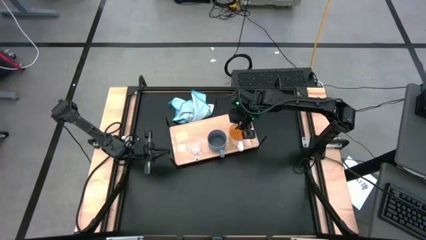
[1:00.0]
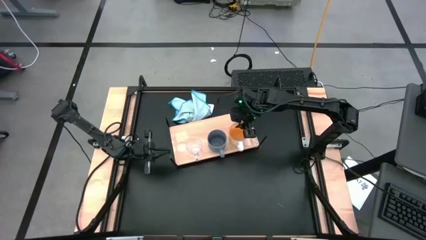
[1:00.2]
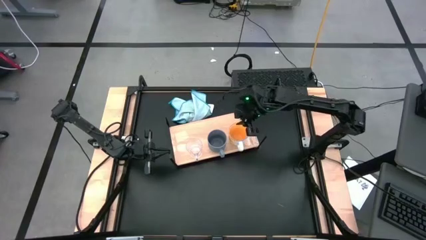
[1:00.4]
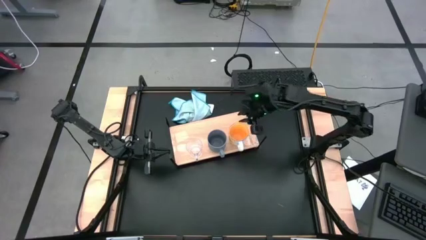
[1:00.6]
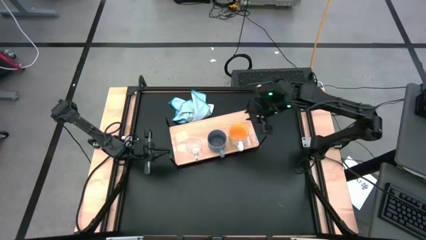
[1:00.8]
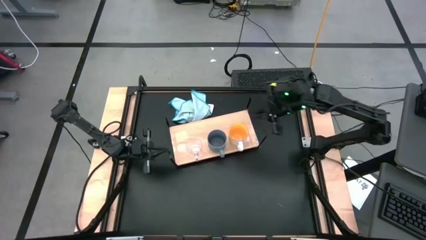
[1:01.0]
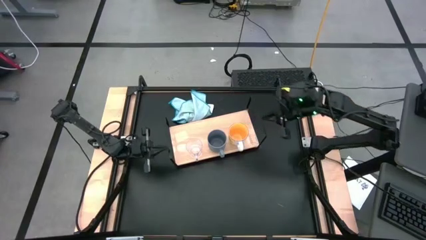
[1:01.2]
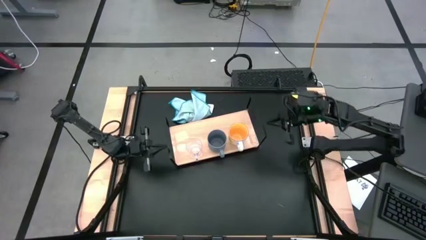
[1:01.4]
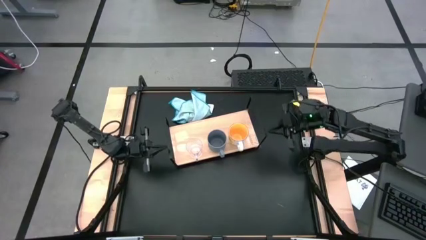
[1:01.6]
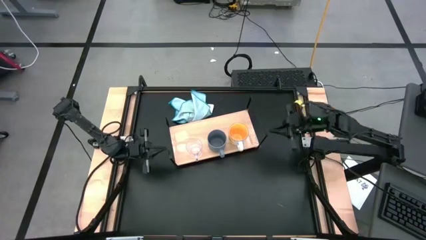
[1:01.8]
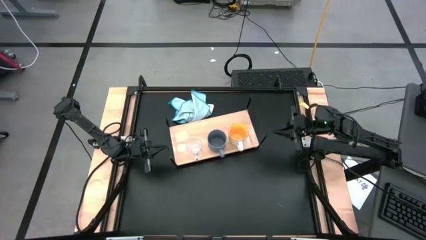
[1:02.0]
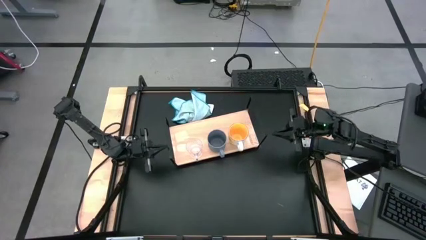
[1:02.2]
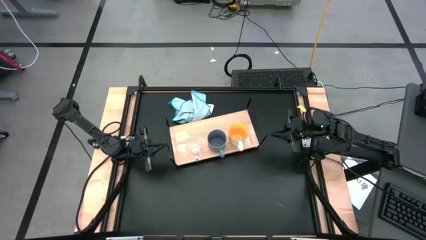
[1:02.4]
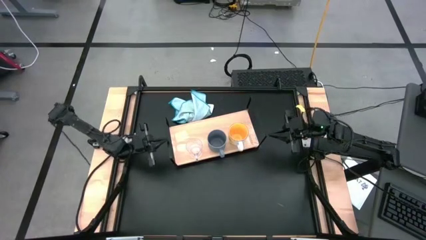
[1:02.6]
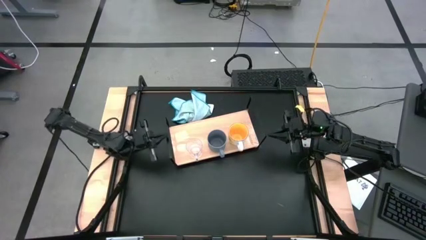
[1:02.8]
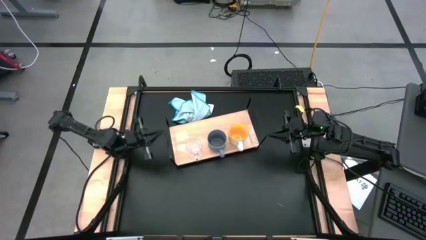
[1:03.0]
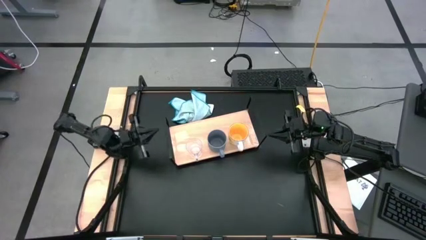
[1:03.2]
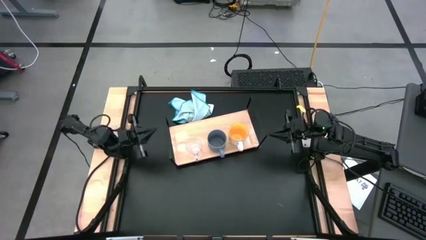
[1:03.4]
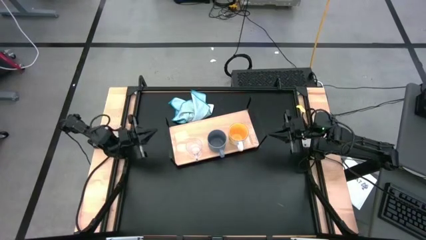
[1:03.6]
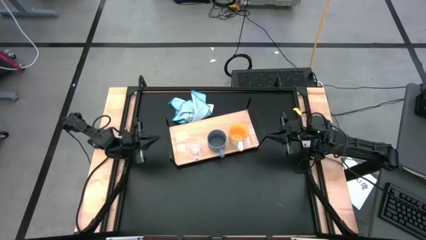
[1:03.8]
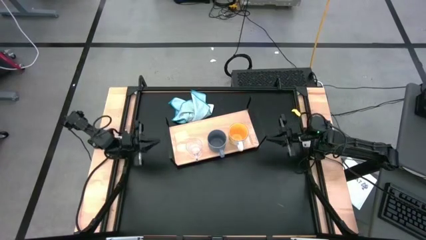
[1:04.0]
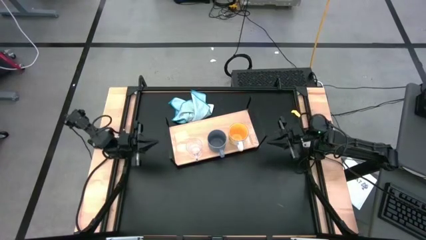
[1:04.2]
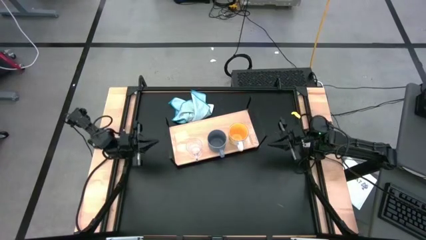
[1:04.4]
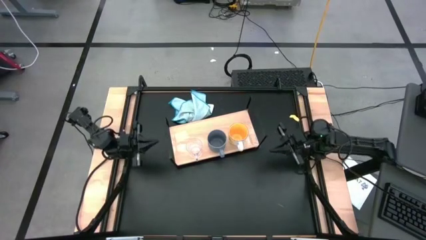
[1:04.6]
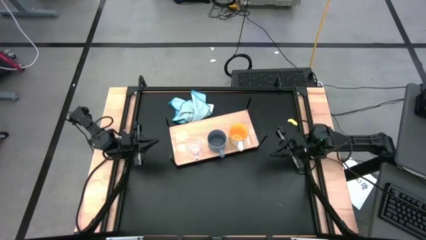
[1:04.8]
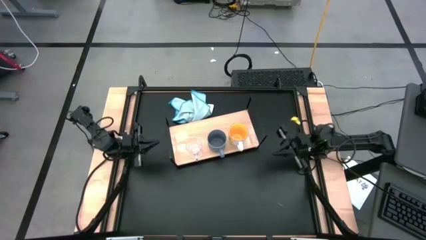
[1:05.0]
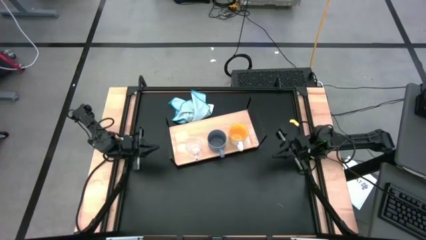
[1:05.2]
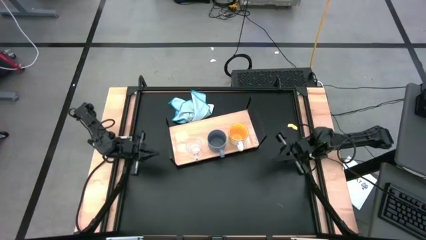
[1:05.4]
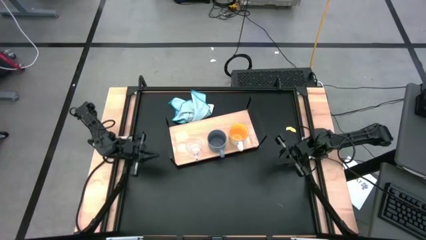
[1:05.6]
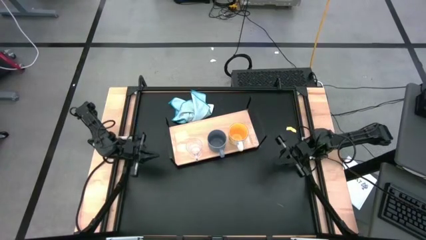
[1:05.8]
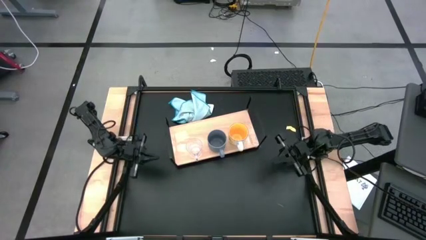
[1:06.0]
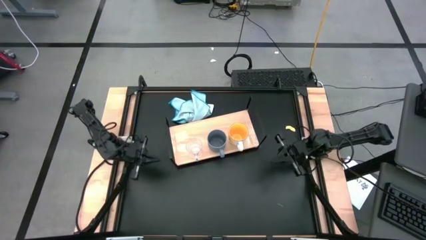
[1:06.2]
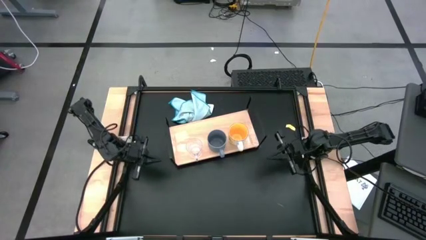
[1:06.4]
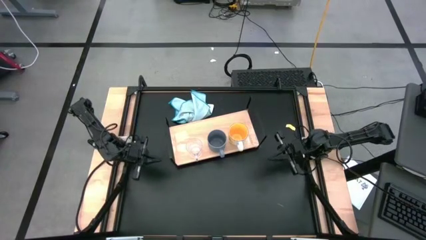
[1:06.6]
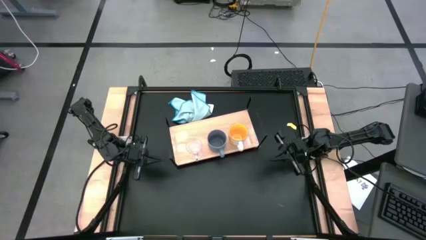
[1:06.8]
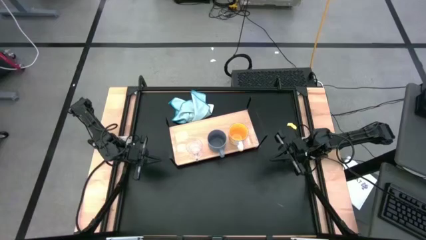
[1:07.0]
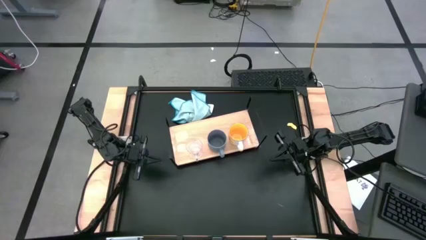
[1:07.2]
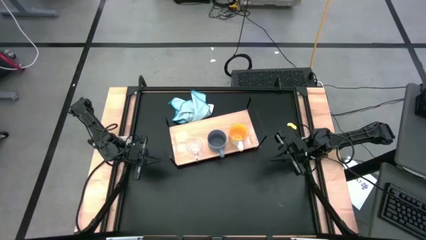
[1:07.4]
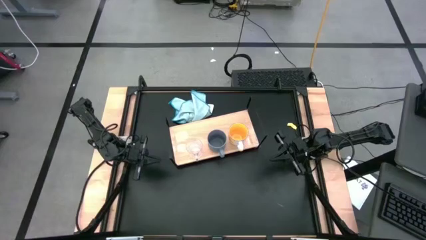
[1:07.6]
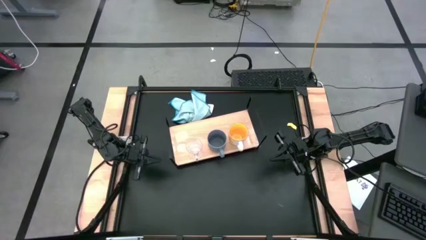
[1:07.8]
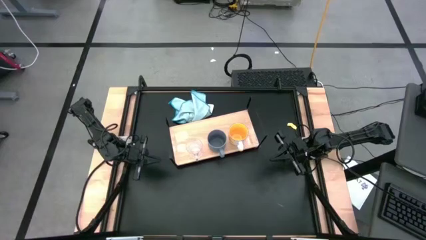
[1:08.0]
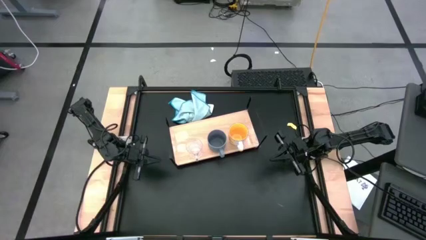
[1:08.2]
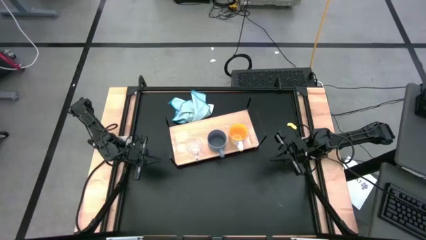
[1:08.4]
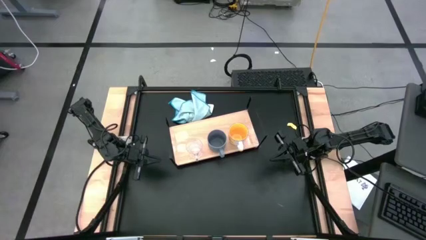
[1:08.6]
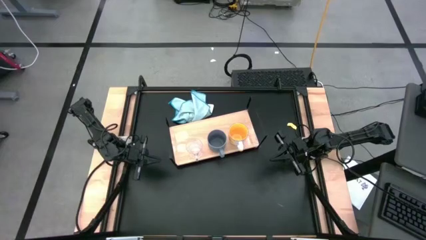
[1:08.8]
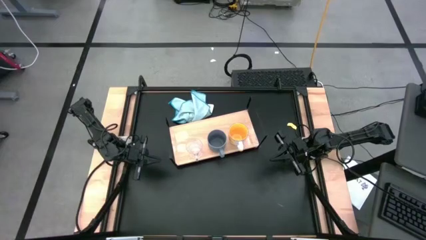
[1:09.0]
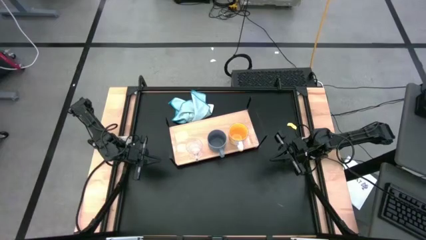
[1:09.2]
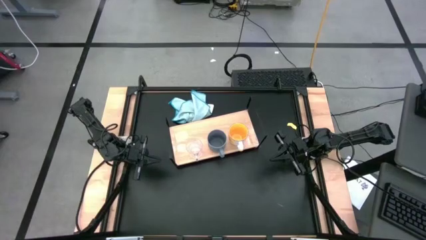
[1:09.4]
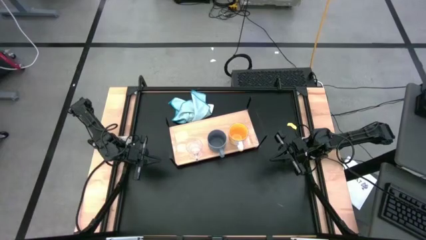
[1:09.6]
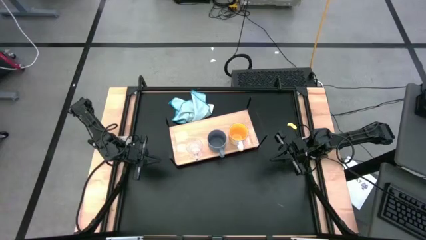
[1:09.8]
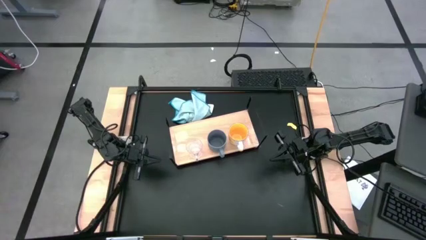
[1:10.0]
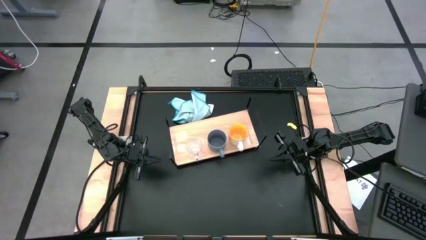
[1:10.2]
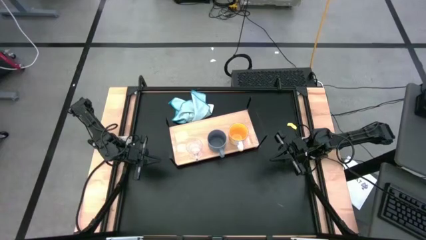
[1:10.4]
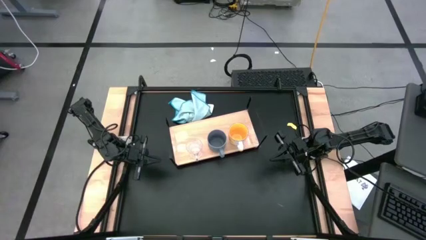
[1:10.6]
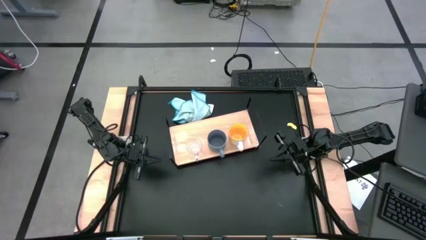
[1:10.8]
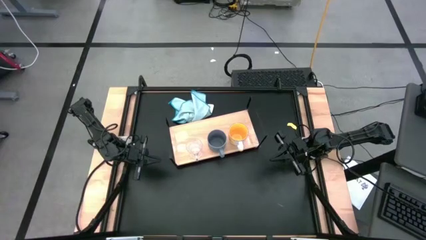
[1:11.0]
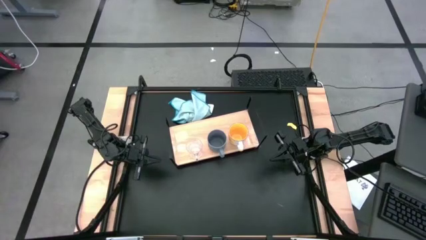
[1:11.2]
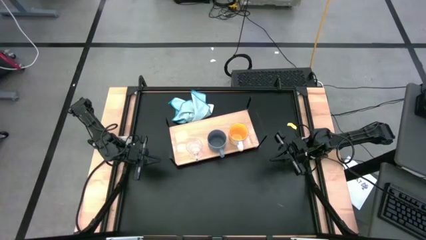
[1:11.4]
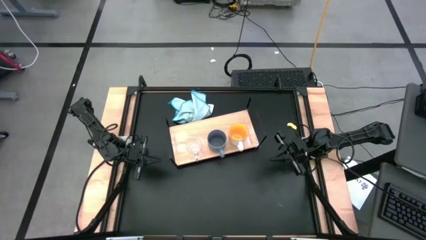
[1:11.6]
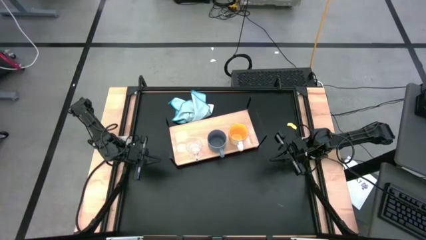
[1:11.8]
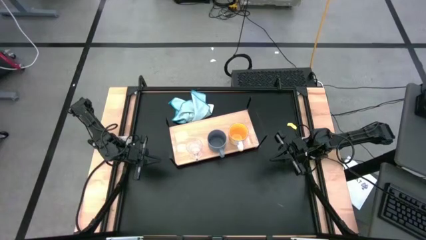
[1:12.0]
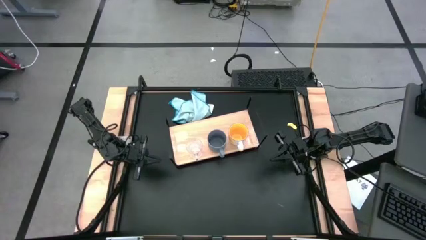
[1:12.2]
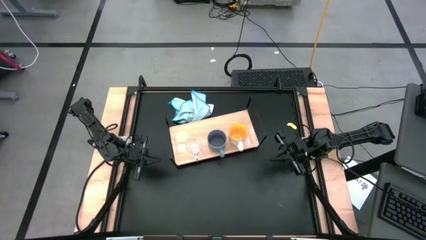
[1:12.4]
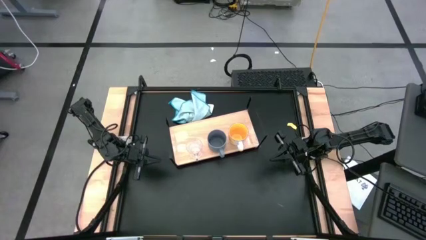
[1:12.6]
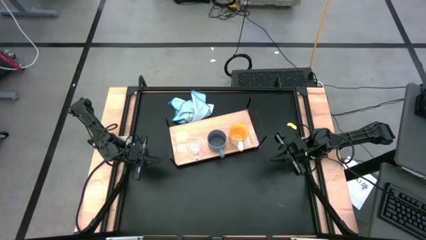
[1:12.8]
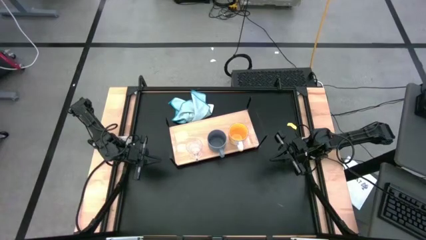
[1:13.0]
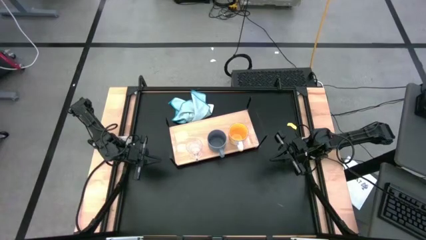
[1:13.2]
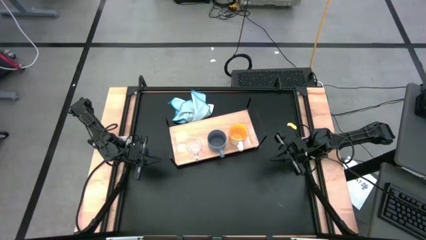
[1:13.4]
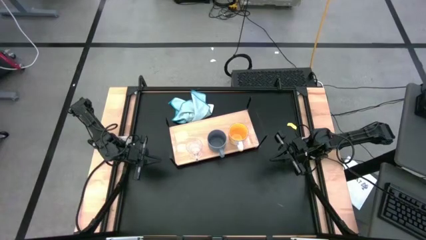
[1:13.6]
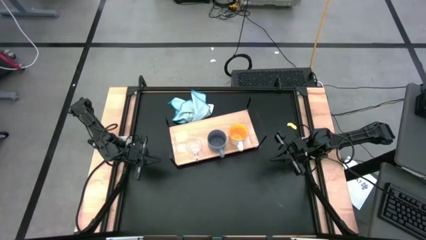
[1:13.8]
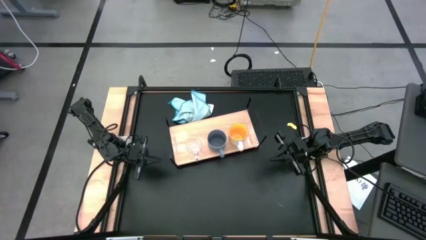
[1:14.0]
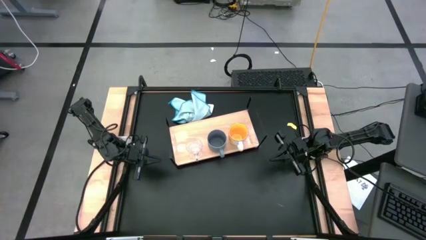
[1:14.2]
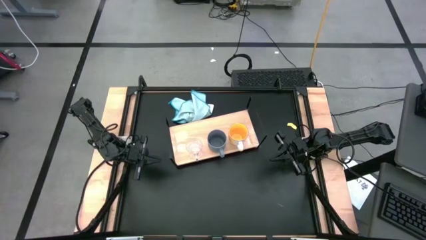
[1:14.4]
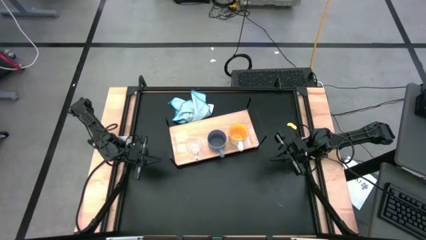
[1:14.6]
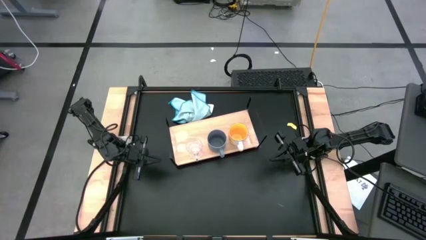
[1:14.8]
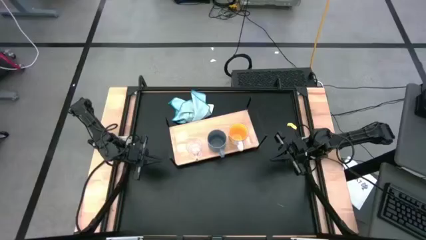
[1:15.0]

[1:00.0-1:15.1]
Task: Stack small to large cups/mugs on shelf
Return to Home Position
